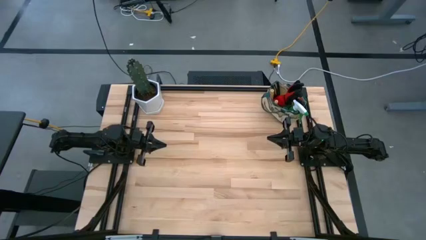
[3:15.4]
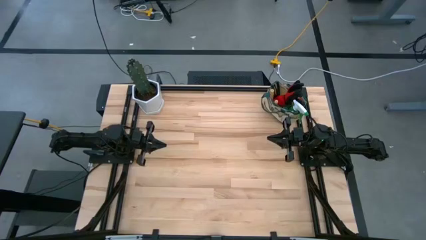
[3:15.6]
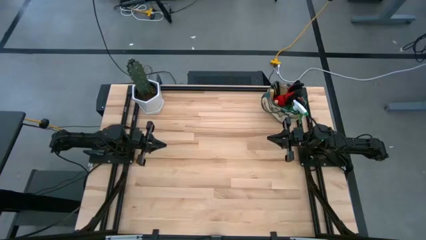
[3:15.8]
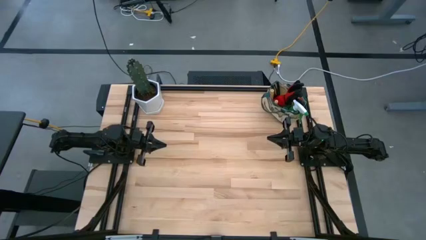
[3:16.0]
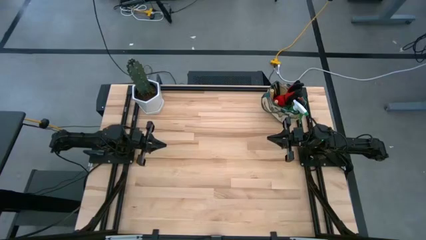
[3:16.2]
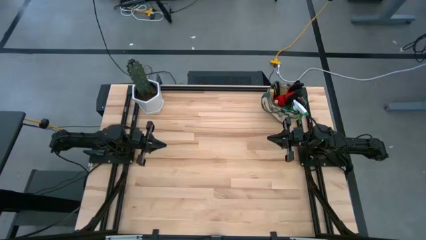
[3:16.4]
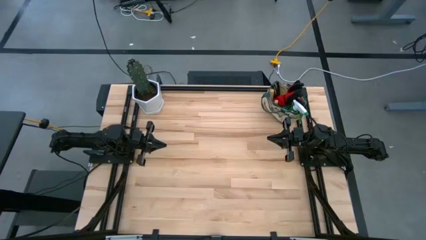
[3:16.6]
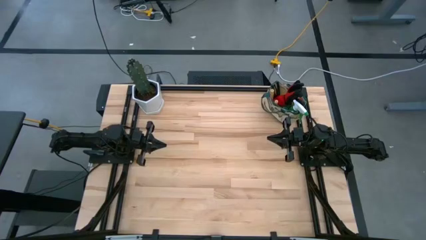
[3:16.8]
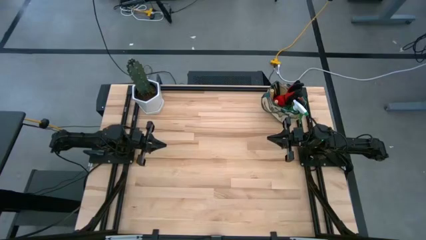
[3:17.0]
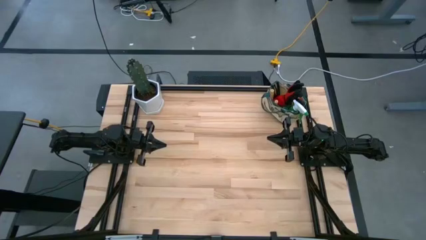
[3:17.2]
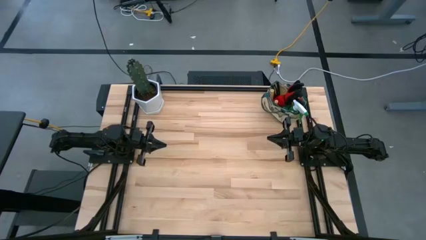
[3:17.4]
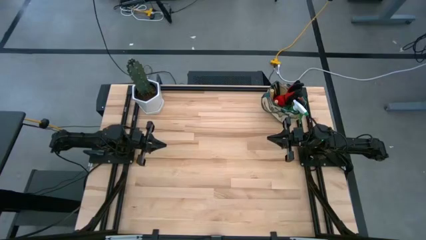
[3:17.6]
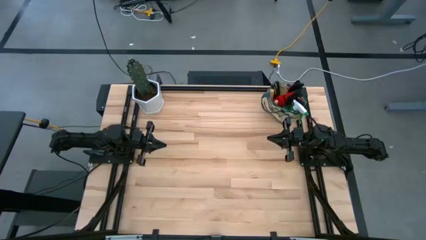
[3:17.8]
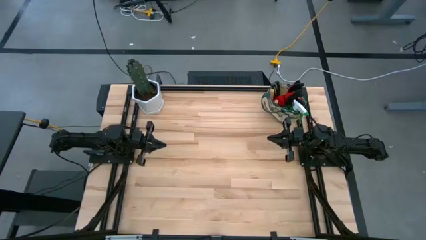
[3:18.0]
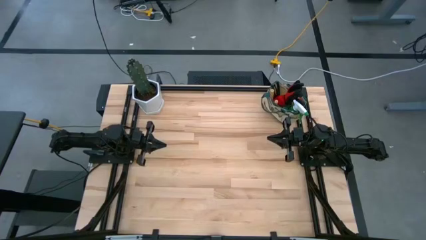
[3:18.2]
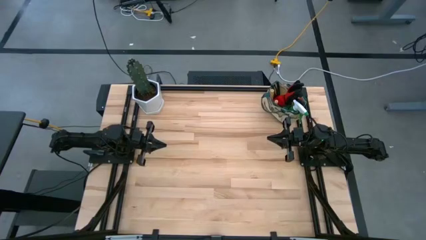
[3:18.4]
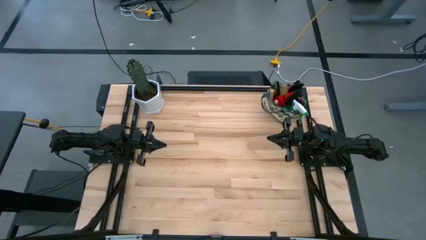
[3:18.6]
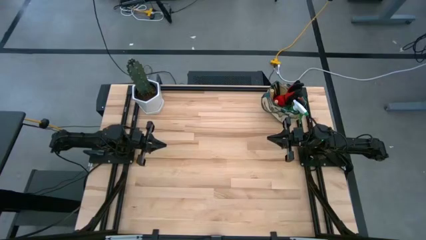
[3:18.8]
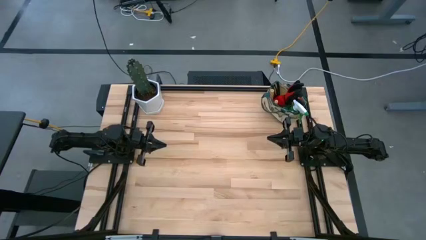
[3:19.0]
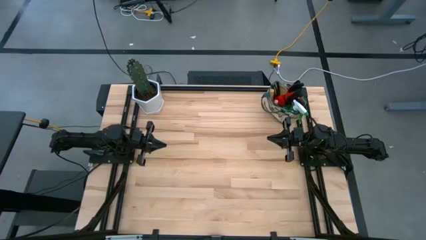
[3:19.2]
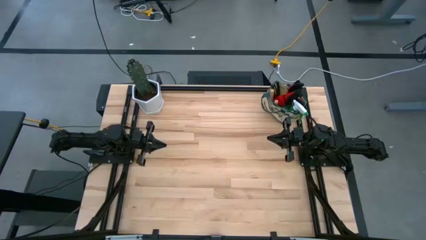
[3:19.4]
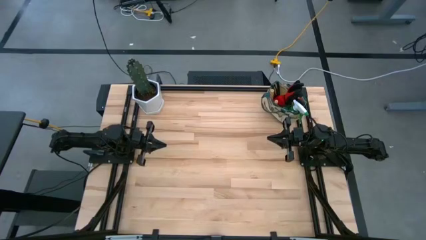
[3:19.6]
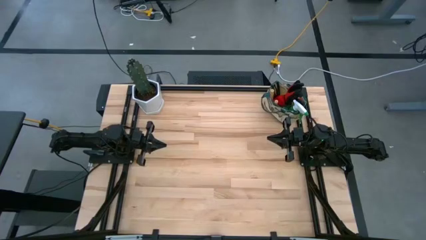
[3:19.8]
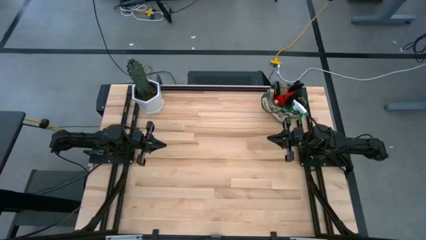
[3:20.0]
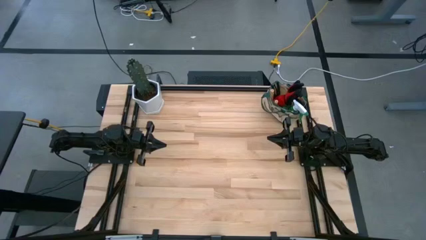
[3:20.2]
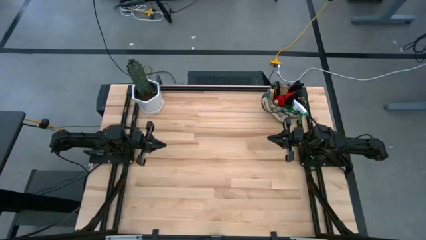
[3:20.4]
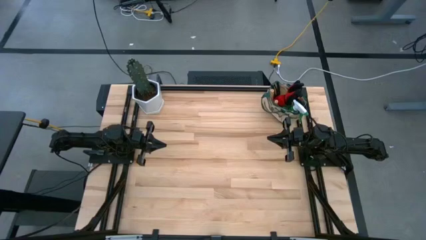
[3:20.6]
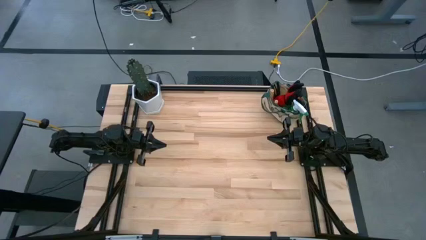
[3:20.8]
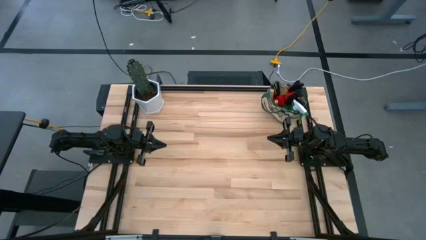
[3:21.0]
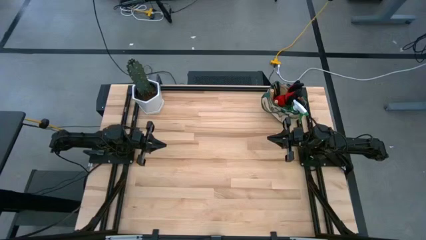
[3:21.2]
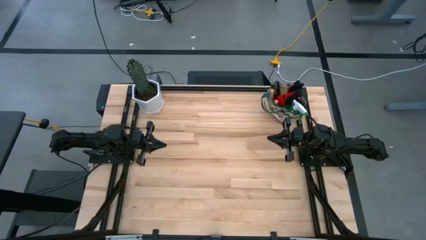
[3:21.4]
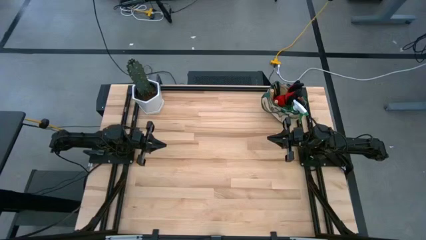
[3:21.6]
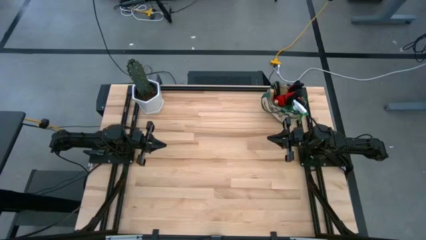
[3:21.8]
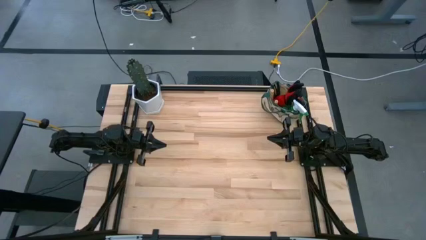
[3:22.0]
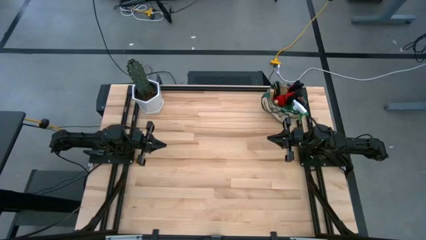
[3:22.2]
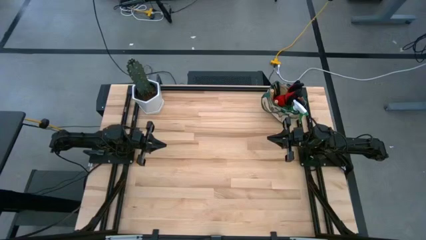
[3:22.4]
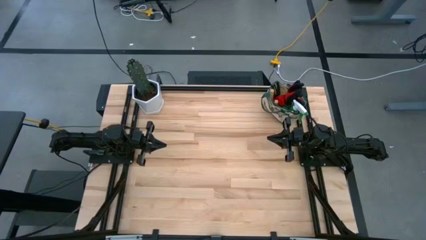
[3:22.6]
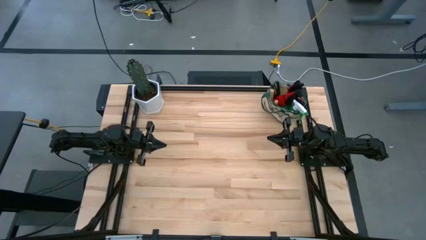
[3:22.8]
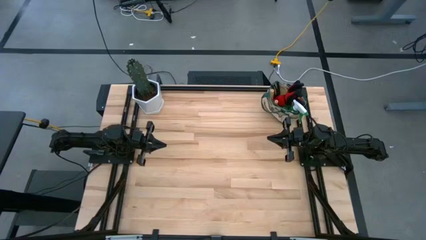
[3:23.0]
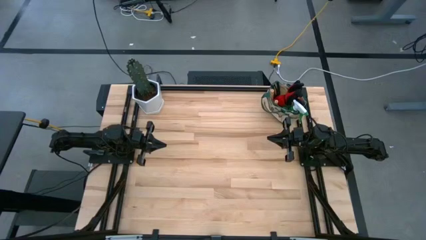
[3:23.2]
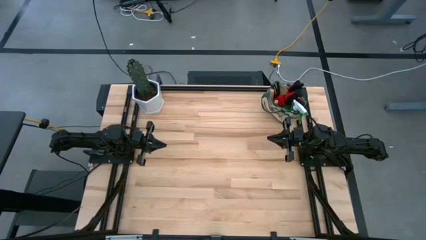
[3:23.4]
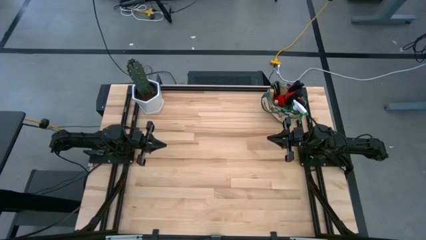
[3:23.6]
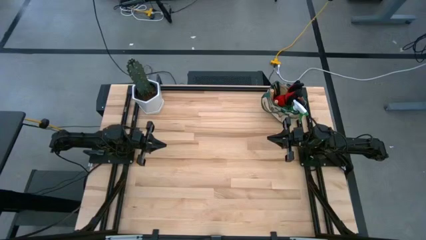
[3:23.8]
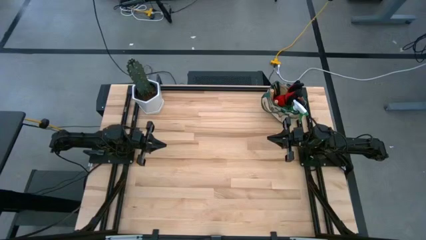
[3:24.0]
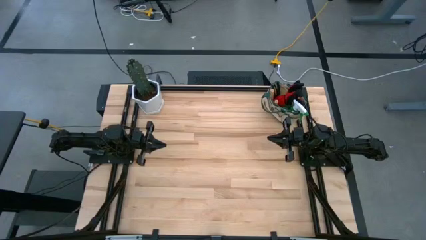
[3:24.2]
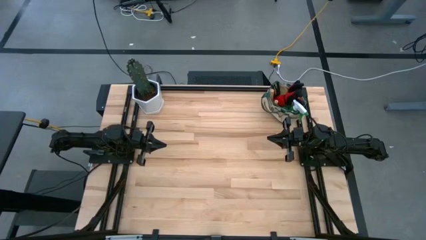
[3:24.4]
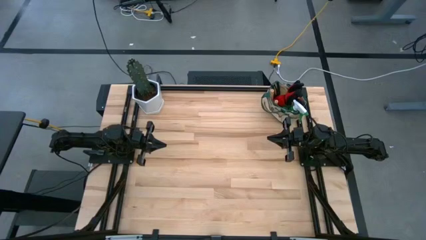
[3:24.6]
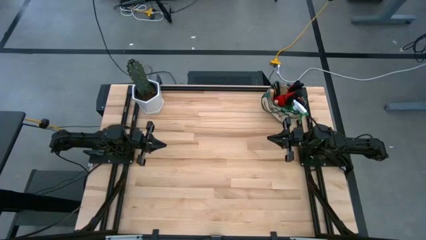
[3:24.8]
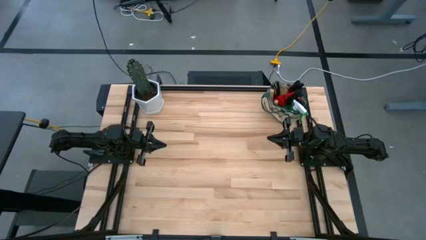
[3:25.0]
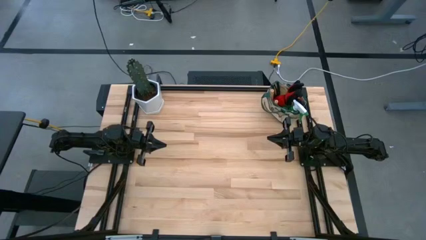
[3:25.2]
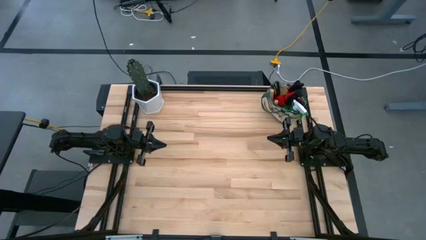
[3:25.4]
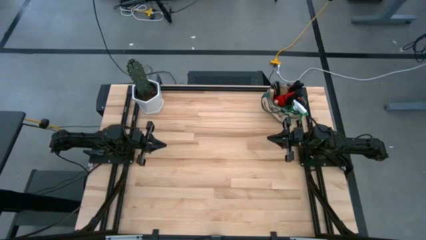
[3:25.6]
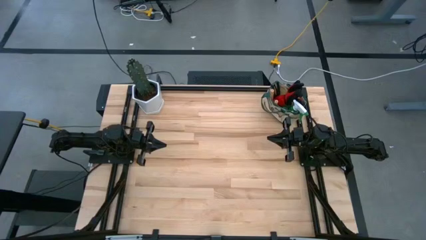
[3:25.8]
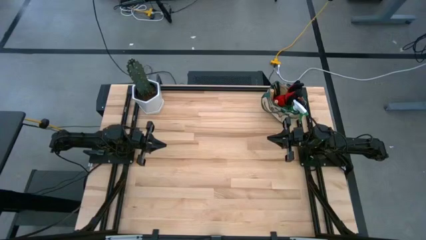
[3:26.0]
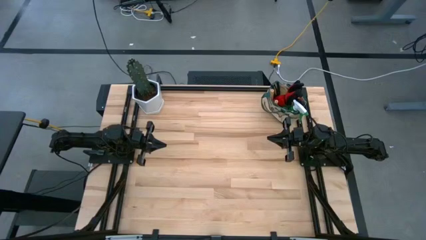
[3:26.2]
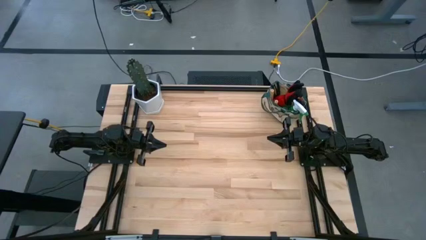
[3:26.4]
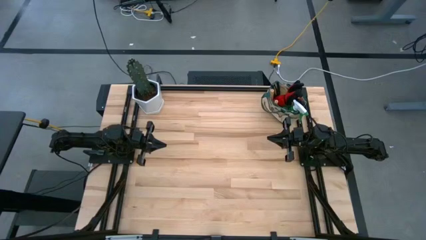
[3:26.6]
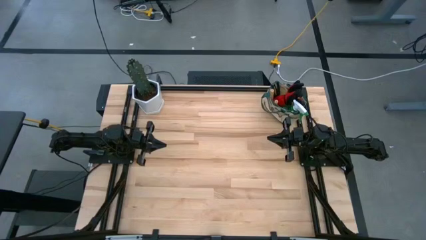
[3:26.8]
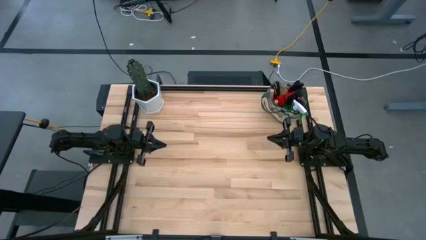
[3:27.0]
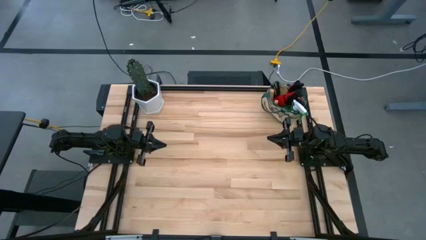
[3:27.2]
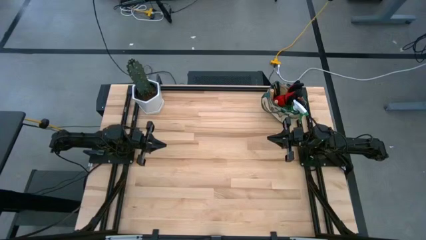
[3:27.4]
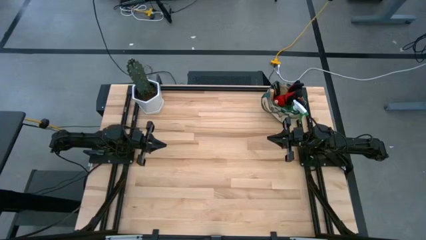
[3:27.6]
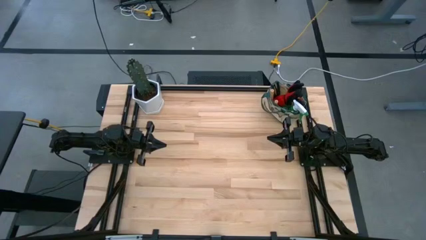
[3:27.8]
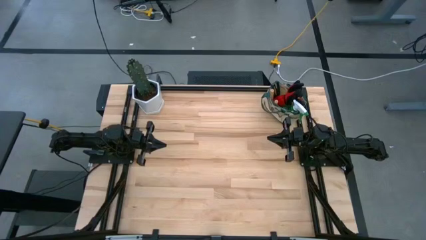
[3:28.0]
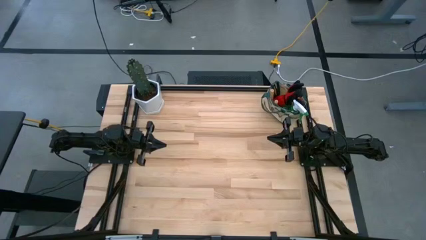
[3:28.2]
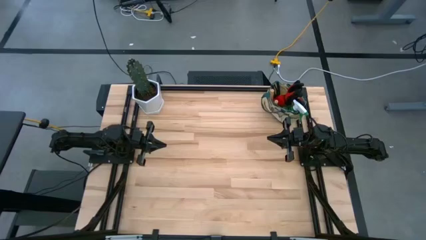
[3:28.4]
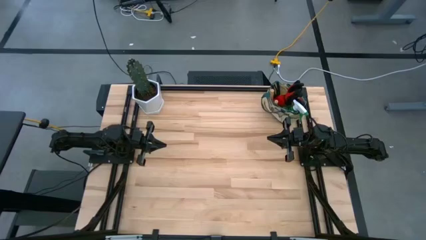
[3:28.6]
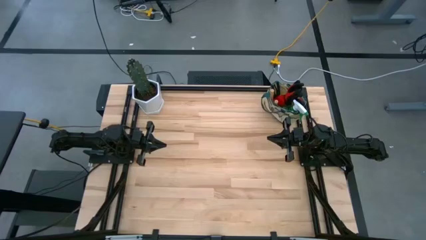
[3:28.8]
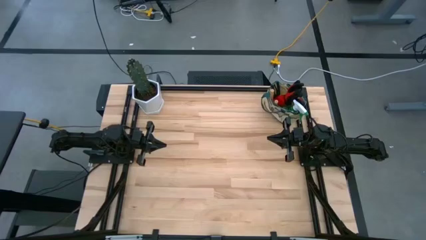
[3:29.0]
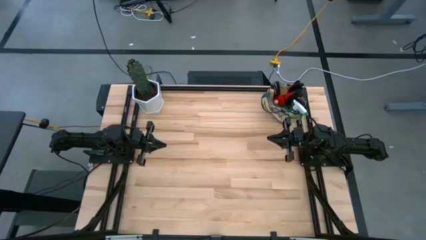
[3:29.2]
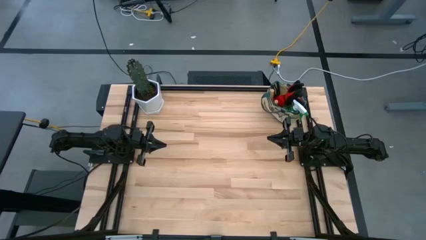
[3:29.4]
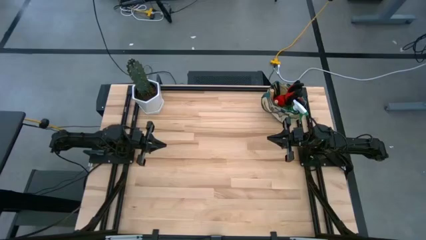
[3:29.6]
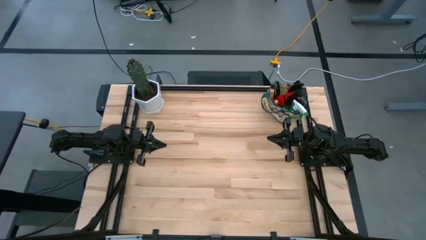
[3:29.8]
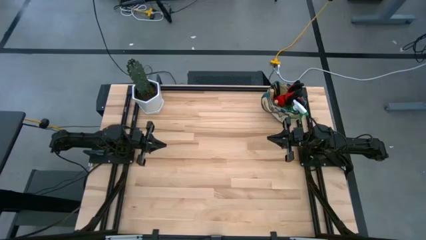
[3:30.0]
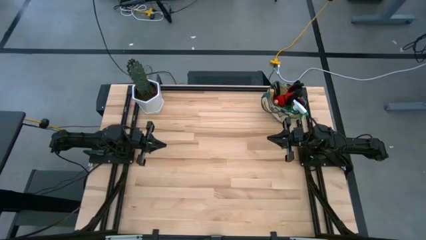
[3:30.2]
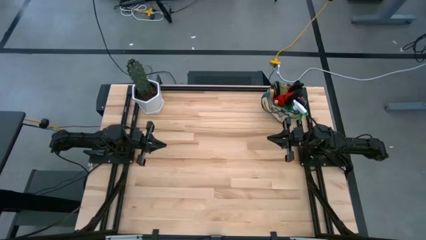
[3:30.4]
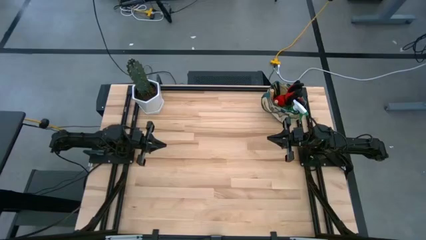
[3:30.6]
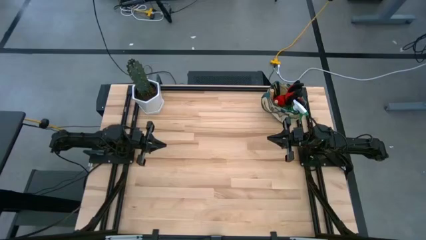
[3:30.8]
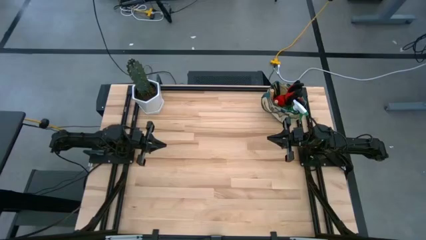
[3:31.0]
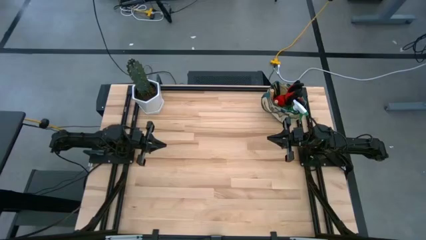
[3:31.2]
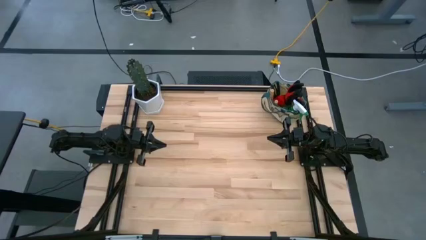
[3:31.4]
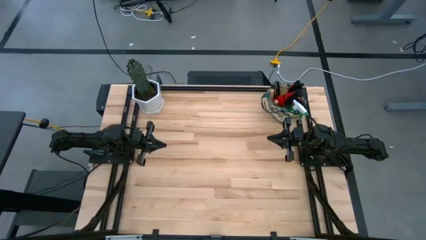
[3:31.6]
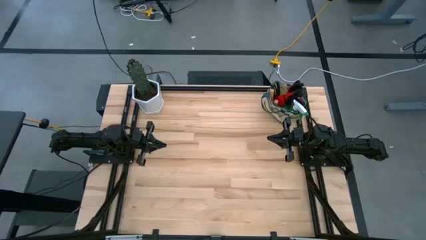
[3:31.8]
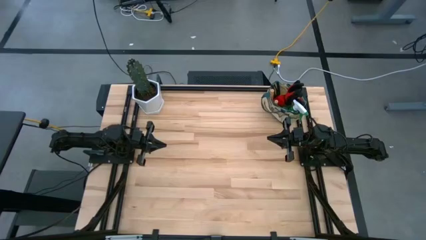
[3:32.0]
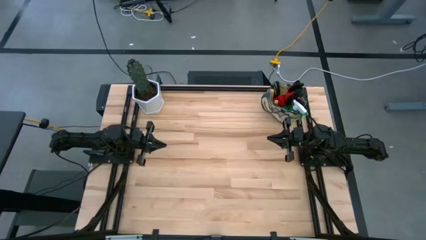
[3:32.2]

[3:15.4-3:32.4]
Task: Pick & Place Garden tools in Gardening bag
Return to Home Position

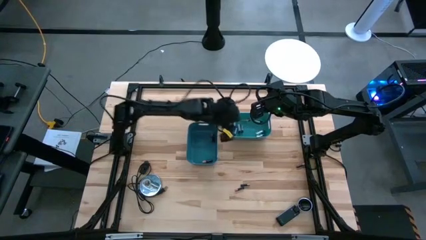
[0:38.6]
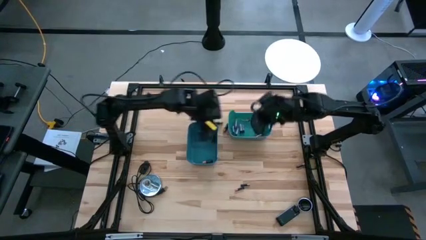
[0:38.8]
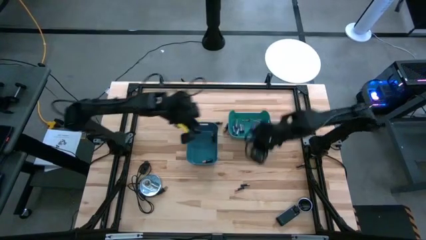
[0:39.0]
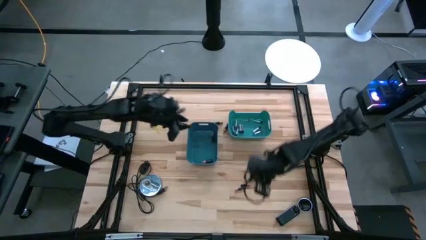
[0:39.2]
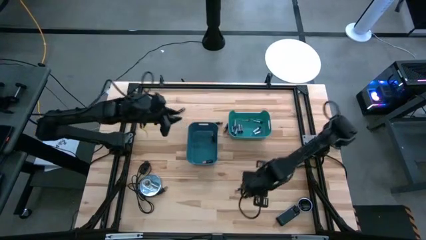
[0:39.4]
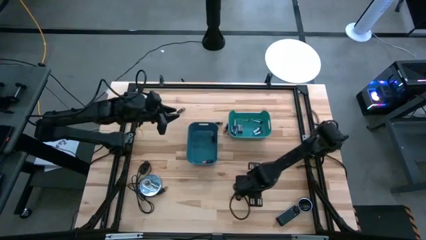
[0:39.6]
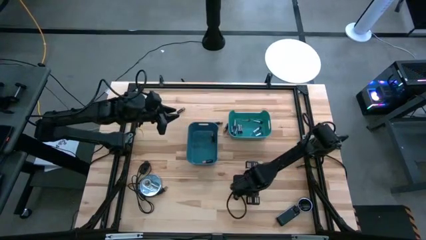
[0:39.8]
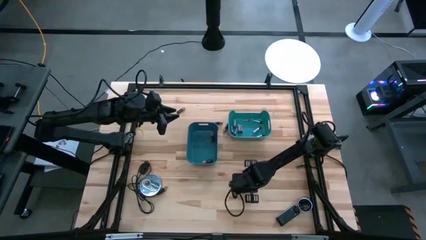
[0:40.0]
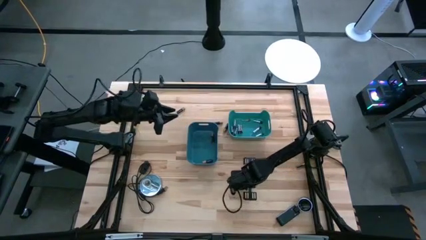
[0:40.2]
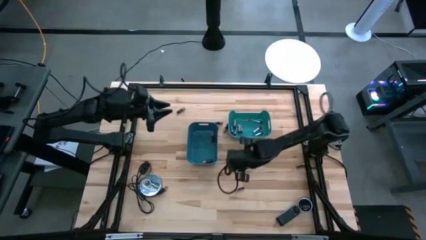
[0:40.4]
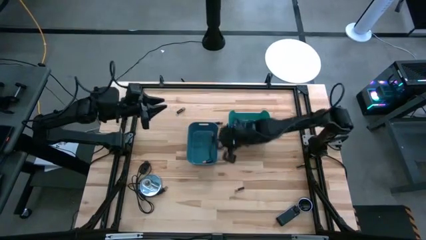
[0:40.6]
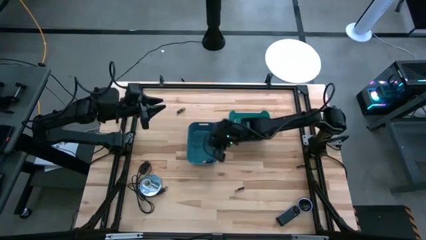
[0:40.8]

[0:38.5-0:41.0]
Task: Sort batteries
Put the black battery into the blue bin
